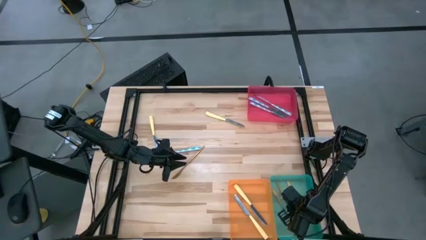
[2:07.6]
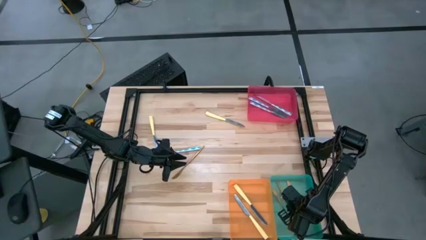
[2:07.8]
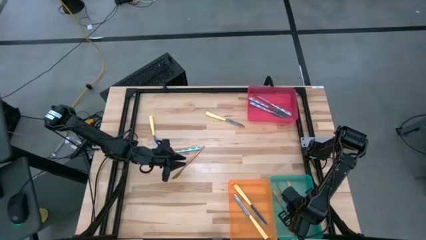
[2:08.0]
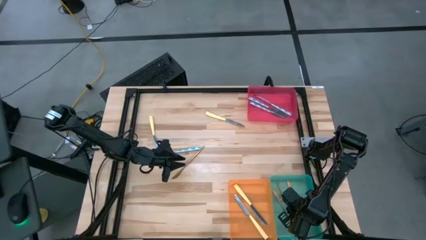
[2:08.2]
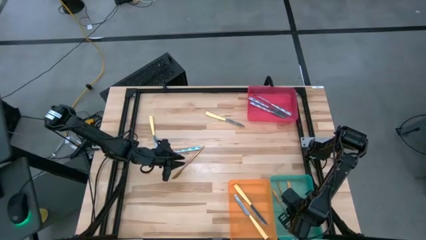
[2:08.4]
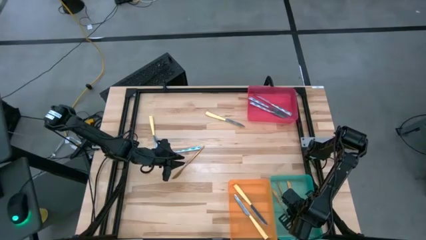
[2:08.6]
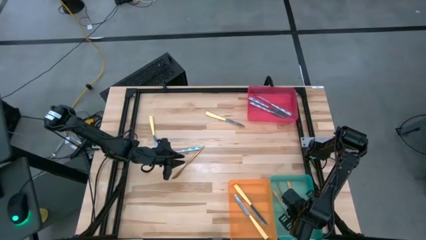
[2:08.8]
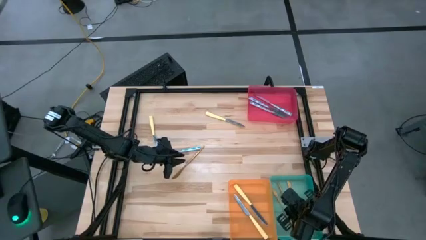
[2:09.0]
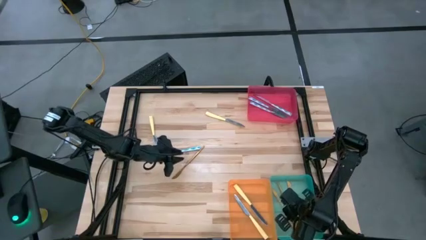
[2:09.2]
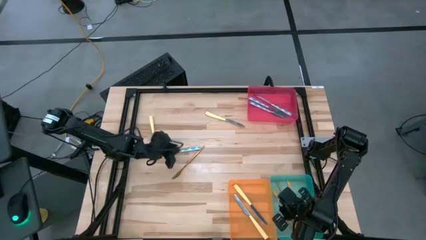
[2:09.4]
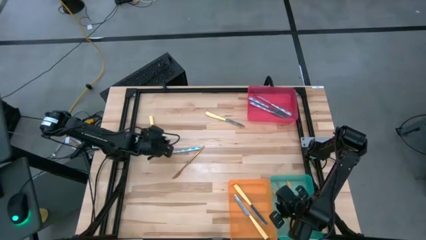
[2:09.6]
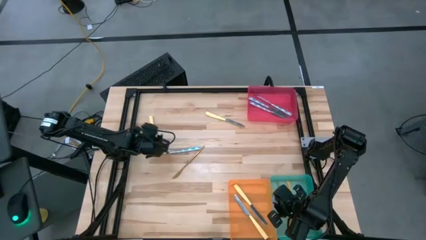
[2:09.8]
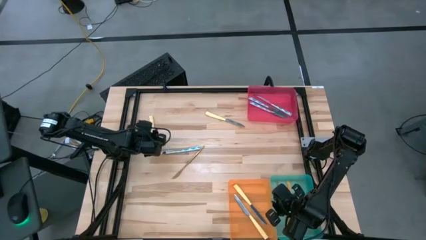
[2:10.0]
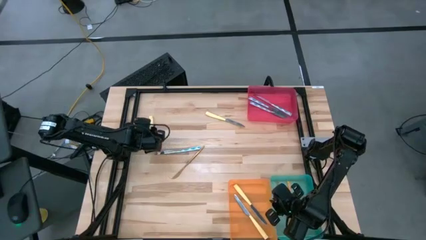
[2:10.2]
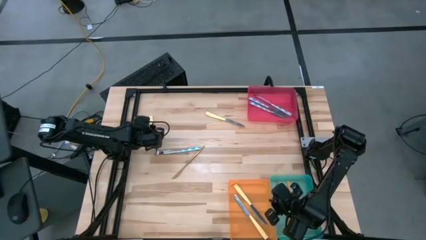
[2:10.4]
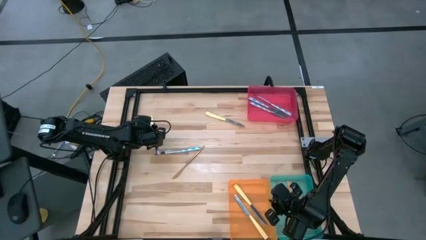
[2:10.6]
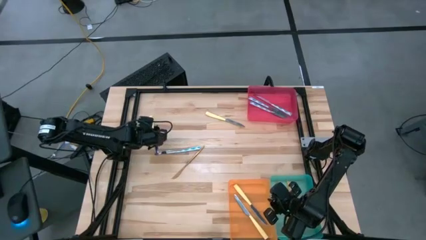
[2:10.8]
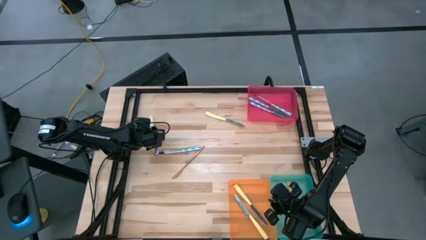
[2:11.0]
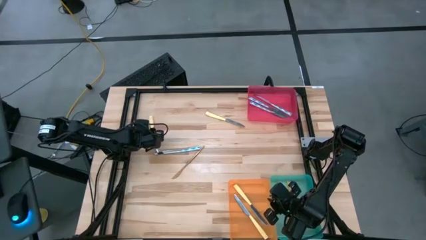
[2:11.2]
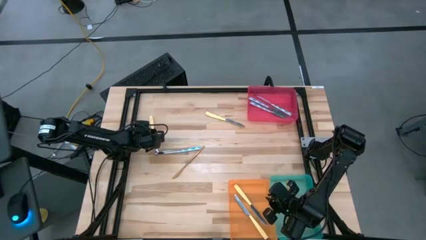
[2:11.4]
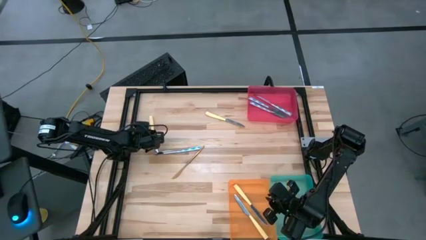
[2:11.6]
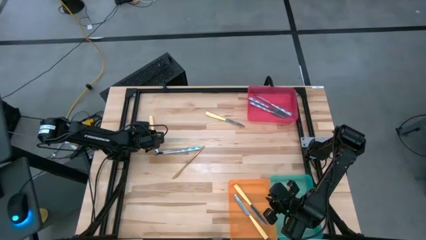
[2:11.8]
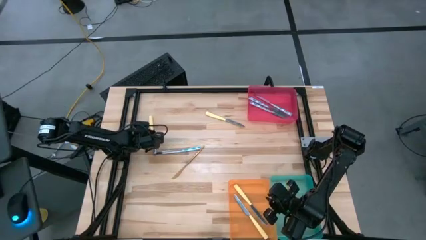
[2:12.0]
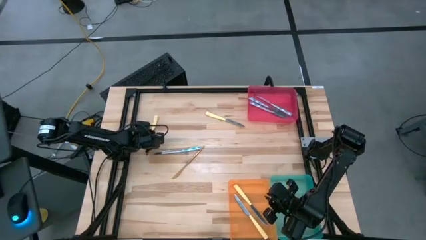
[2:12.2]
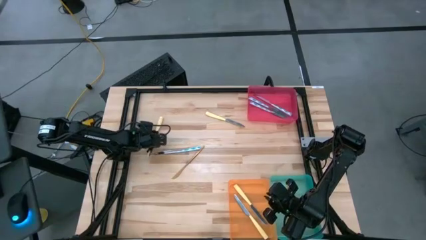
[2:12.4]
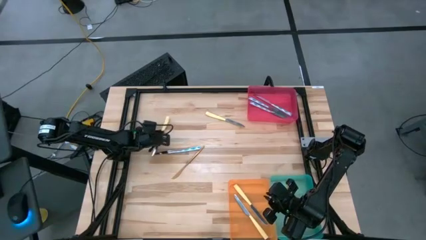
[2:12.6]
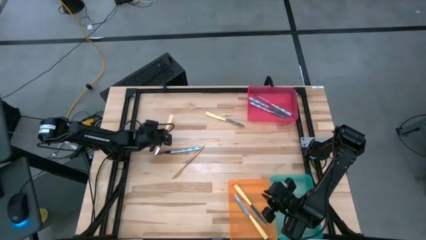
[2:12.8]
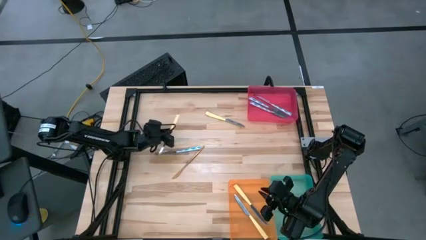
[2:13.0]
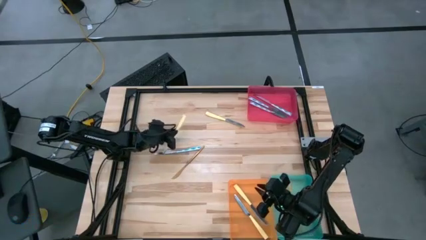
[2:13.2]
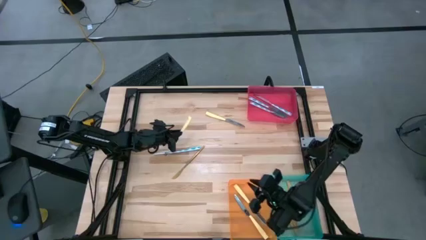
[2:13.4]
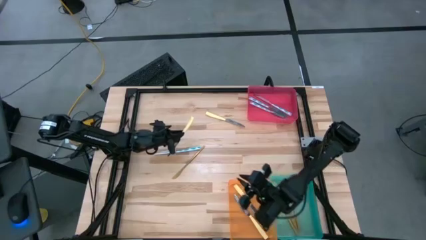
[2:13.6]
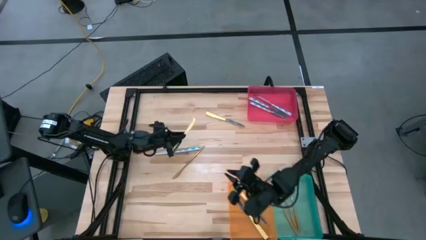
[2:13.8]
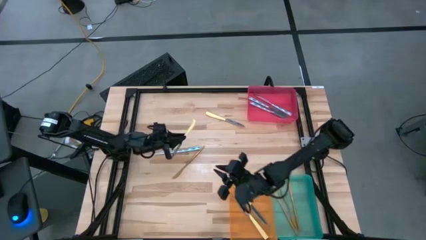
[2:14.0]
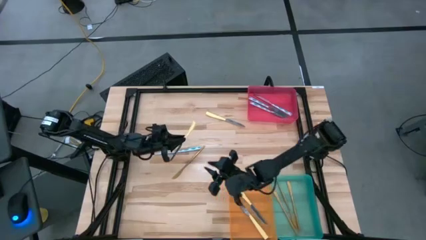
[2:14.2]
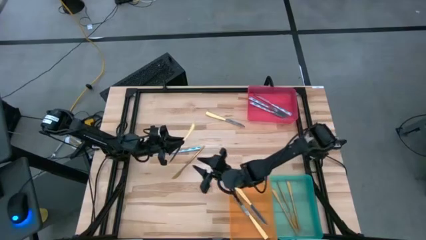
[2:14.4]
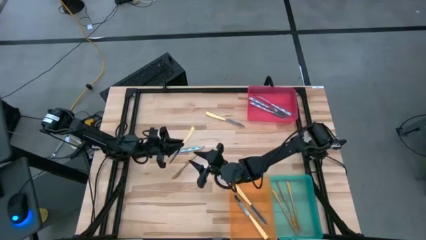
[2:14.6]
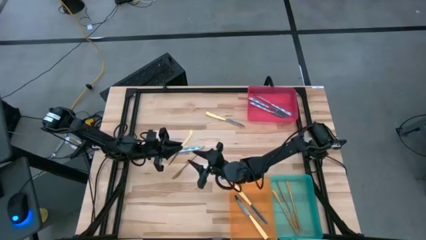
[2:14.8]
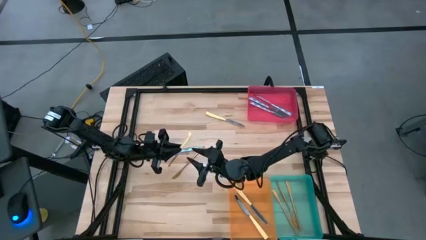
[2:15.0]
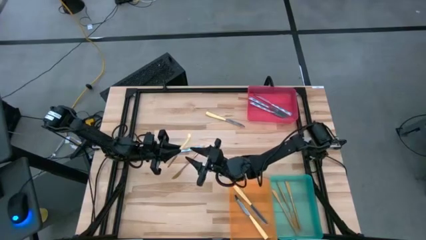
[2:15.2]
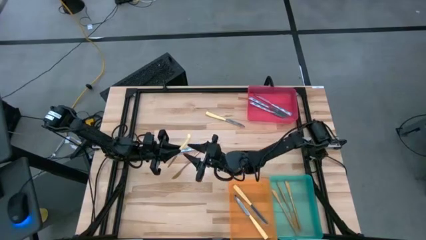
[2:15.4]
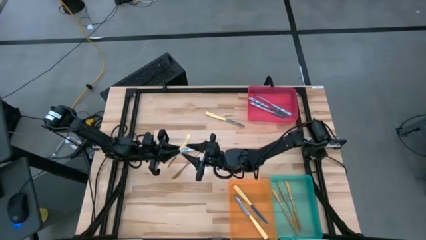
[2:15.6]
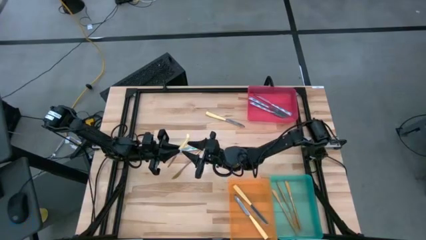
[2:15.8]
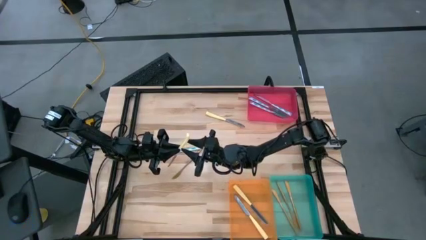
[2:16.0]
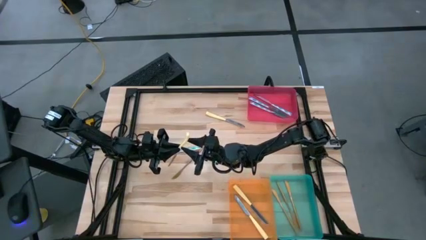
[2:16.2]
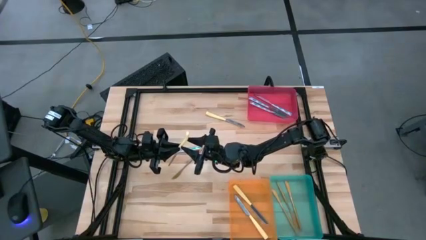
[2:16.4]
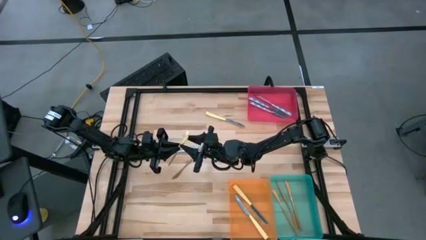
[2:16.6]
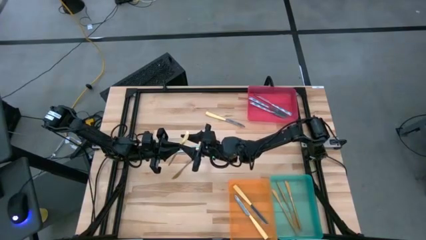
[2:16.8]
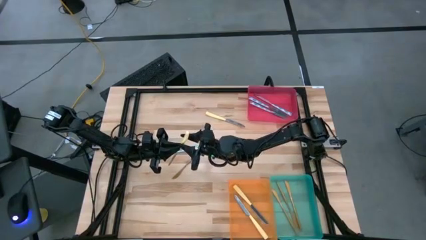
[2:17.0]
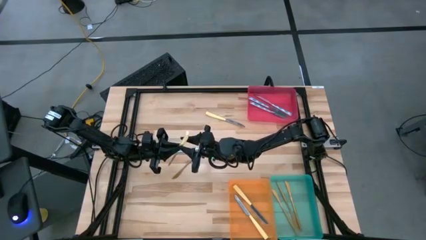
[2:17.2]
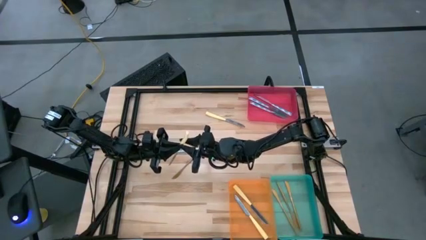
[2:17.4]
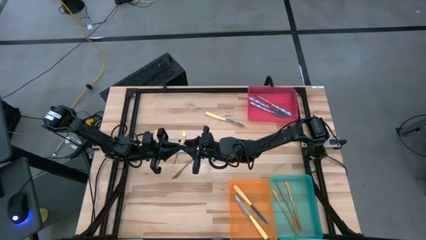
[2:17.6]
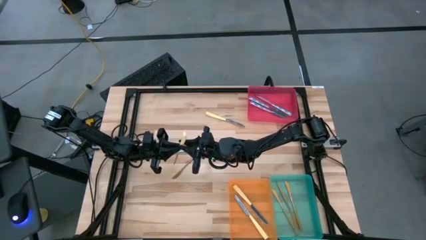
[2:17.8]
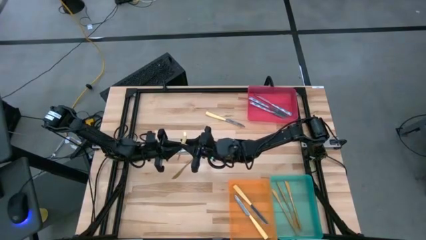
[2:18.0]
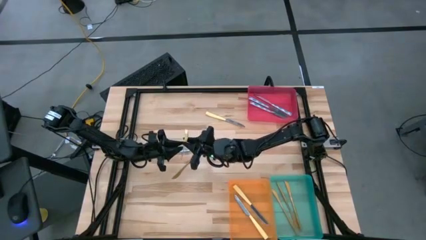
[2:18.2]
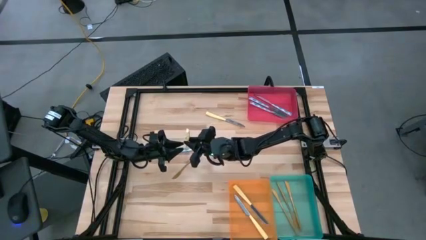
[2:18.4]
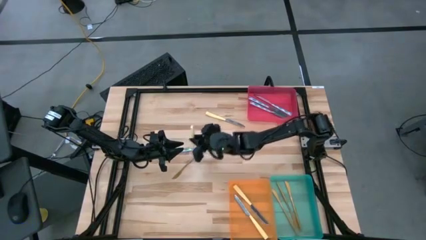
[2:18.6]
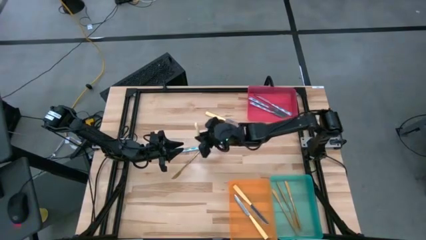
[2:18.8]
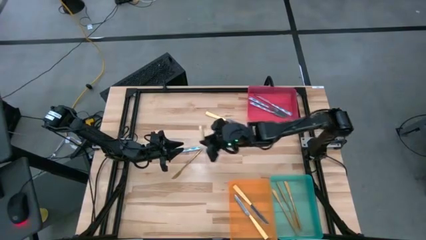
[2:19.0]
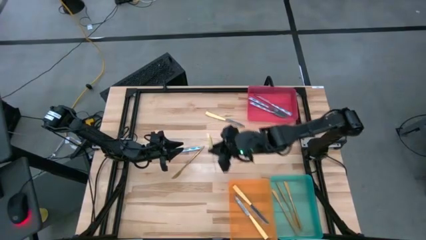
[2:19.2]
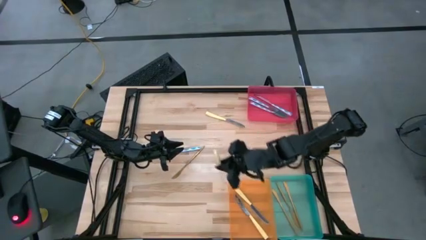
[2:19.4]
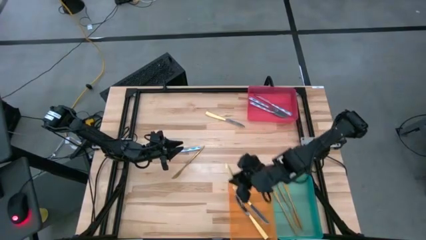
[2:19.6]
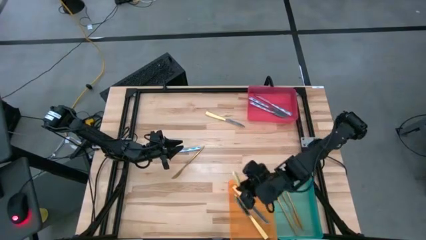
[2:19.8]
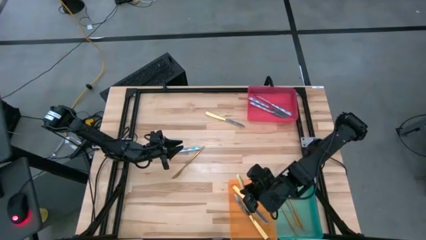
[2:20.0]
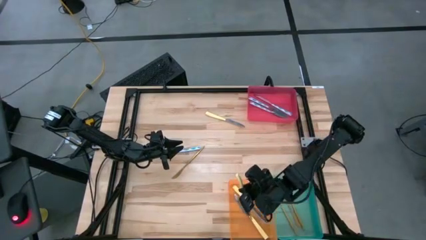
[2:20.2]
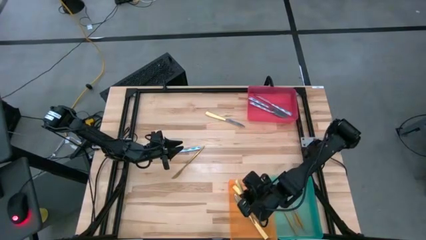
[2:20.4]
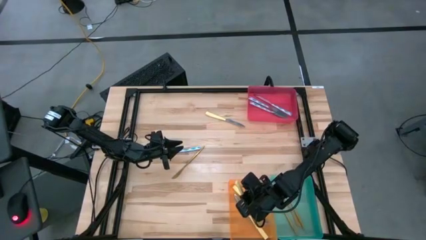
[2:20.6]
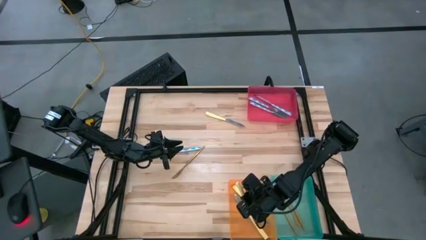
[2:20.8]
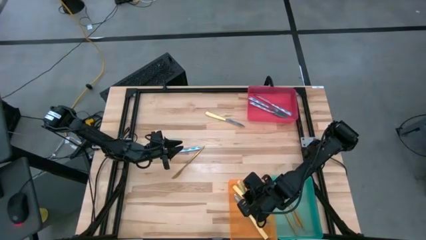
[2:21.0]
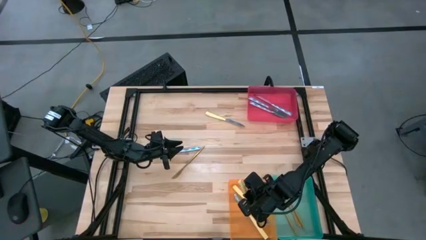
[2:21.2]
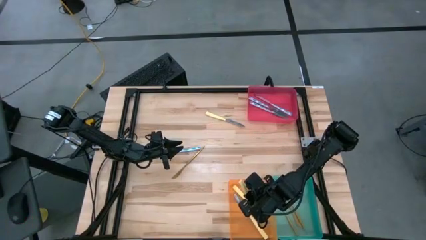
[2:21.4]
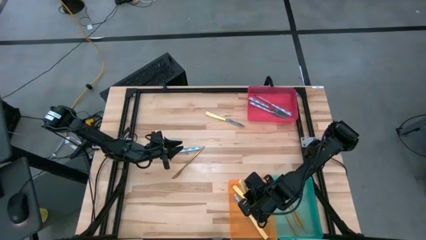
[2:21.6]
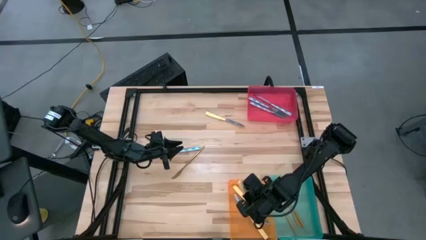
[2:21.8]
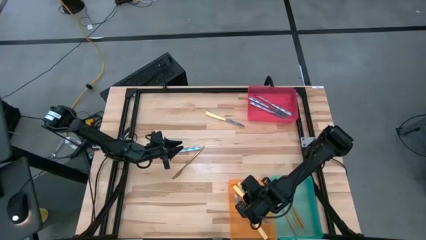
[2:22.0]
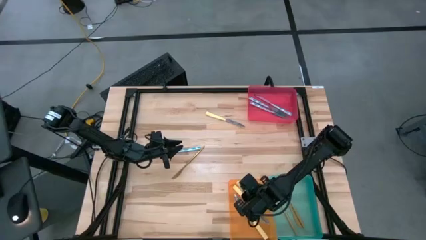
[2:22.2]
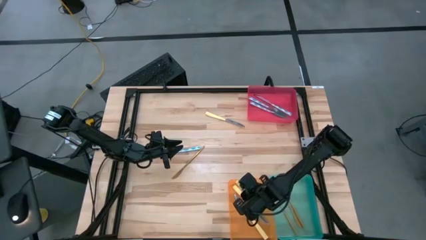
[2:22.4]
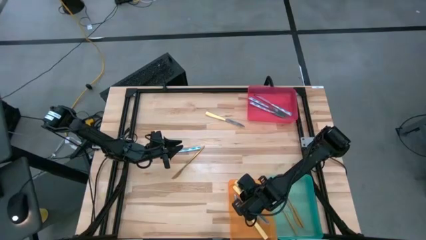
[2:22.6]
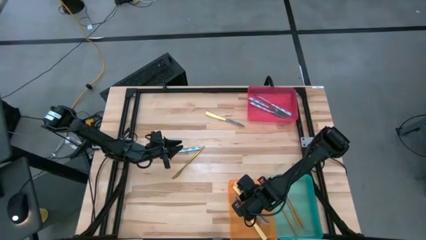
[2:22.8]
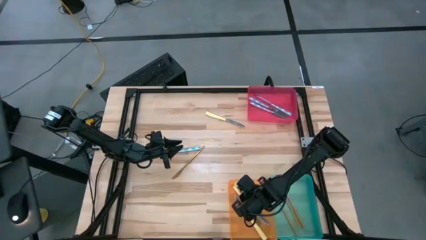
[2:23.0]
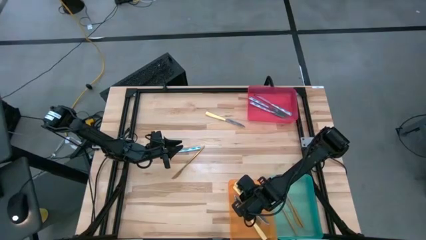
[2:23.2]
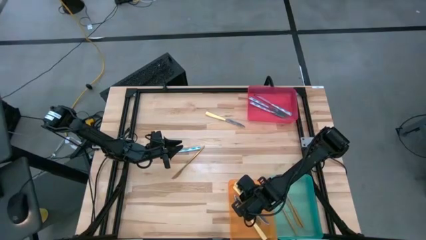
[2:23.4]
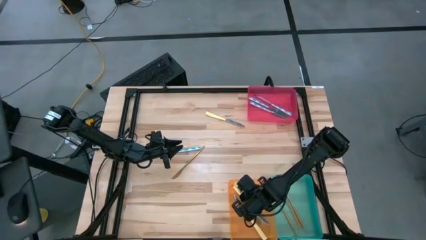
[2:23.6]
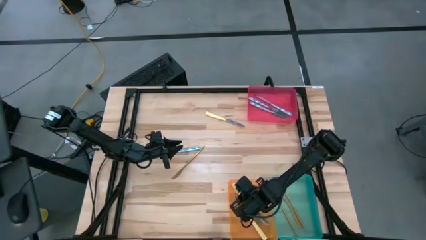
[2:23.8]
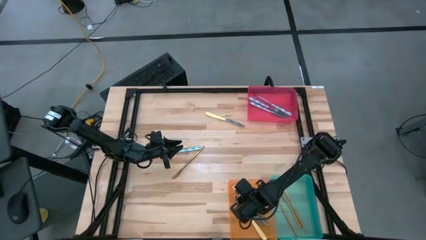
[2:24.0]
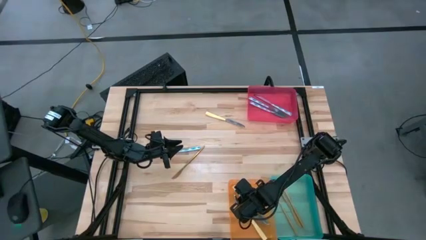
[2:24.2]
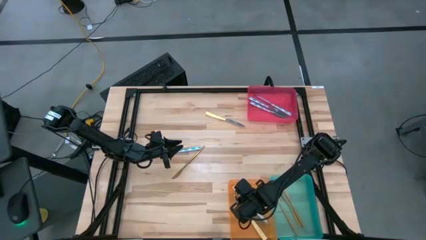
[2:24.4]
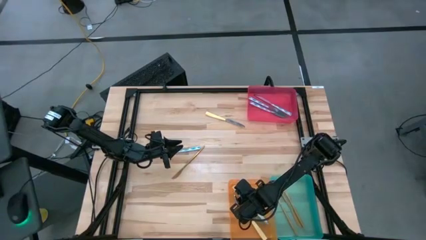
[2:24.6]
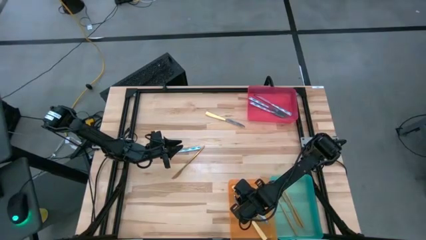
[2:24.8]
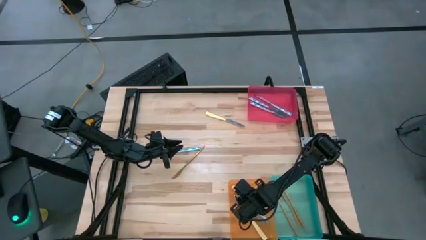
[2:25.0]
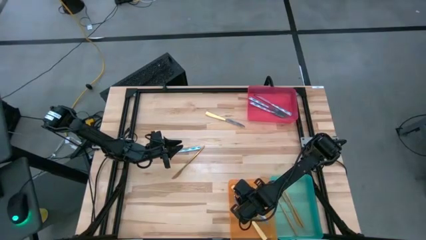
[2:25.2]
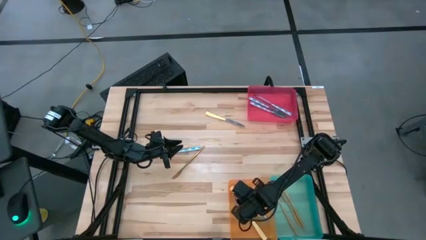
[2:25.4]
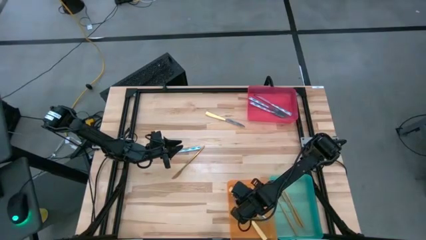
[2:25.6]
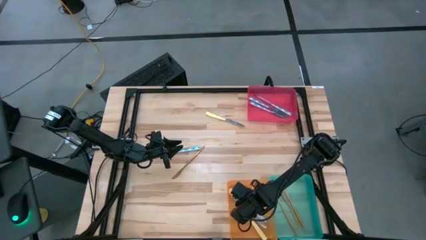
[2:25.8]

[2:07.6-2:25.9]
Task: Sort silverware by color (type)
Put the yellow knife into the orange bin
